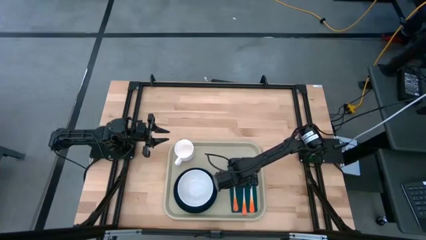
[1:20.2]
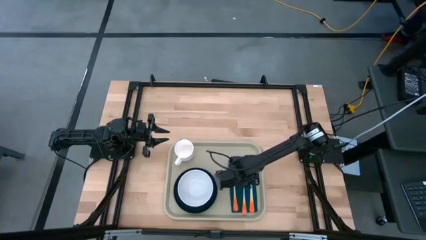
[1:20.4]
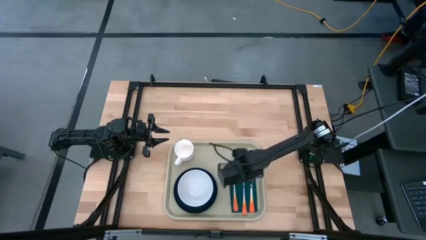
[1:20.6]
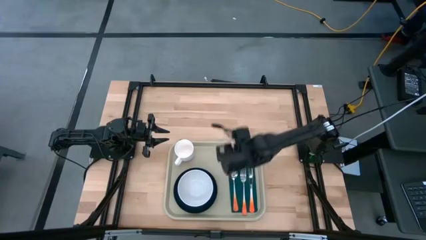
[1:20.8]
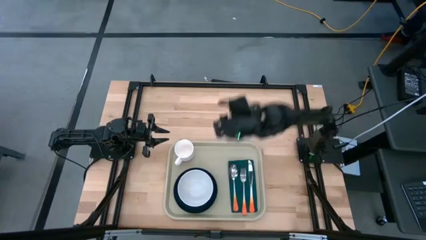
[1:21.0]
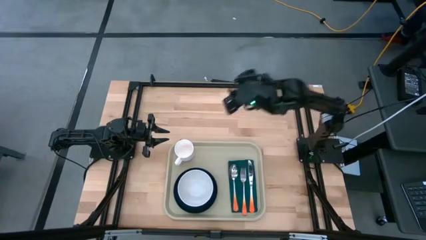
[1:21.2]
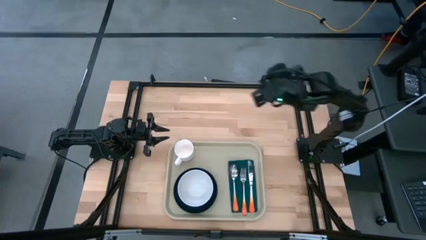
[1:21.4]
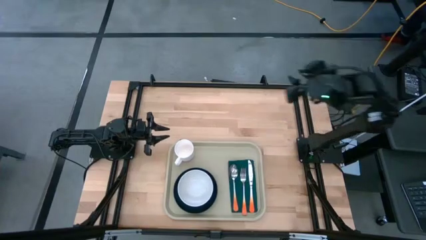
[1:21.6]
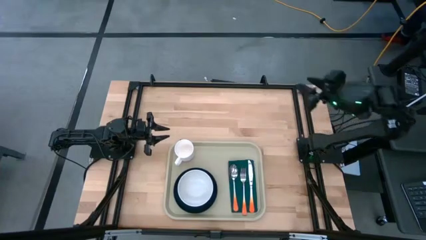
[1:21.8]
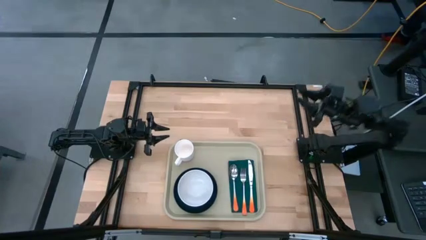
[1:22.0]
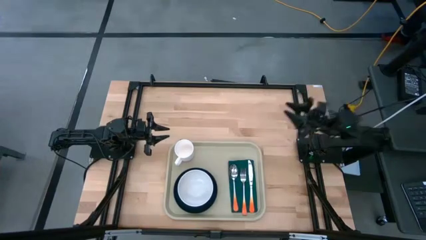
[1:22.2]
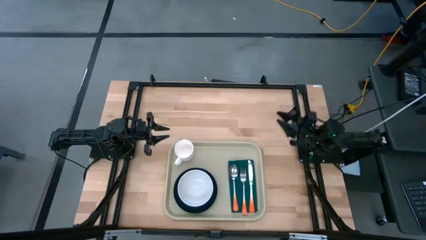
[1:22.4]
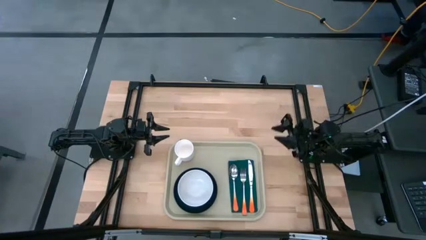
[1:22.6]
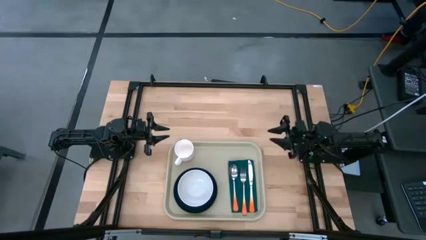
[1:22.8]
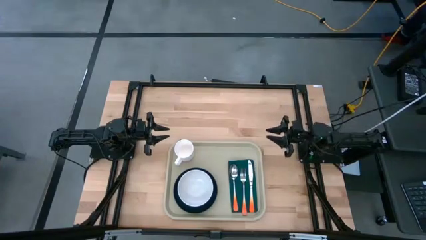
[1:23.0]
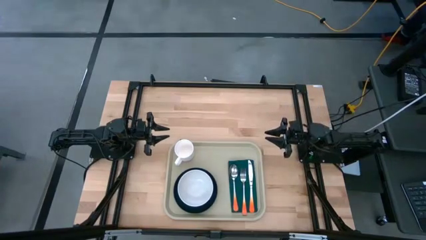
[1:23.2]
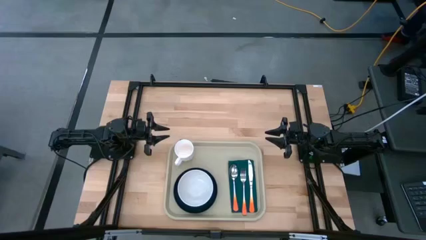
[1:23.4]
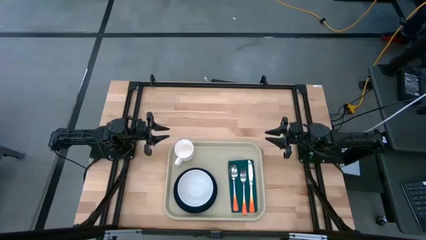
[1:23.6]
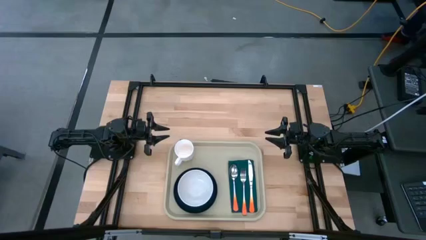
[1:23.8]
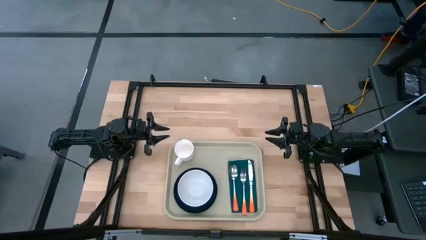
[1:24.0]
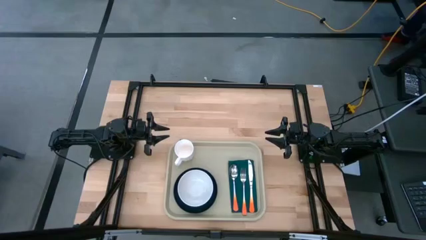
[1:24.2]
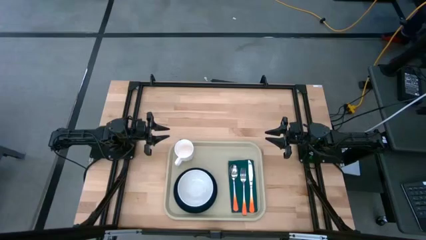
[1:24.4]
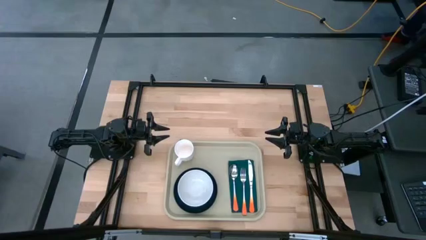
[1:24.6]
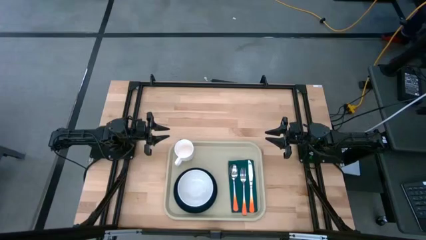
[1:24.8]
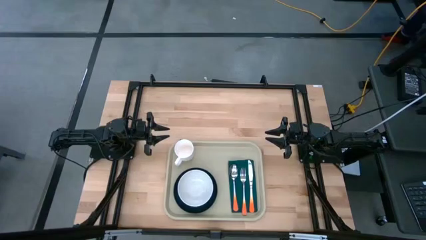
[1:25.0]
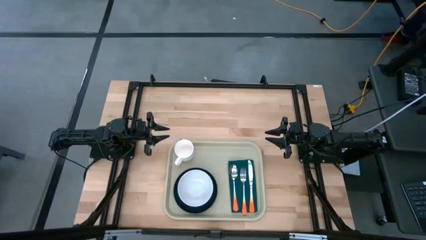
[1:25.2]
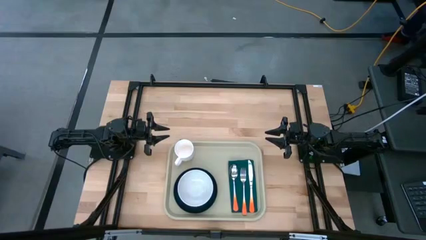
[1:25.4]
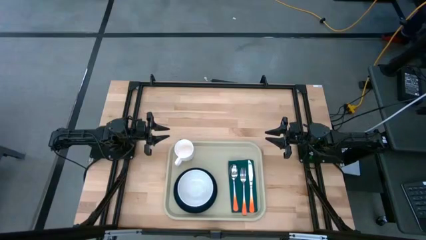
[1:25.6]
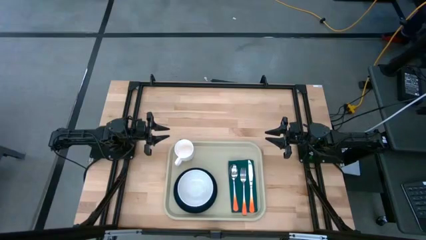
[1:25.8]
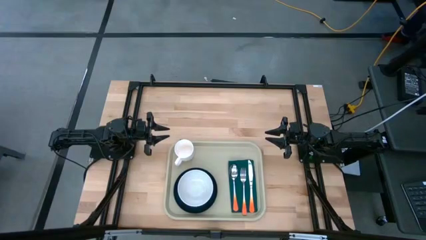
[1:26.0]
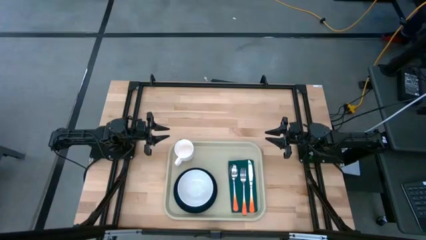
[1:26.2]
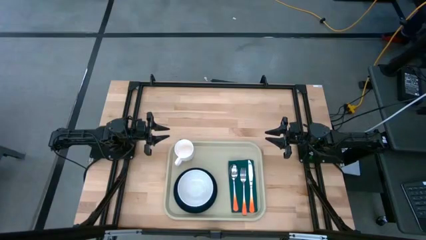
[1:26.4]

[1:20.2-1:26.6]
Task: Set up tray
Return to Home Position

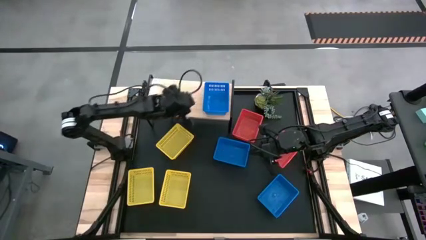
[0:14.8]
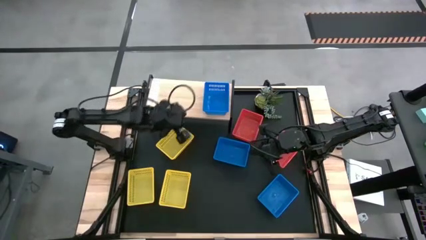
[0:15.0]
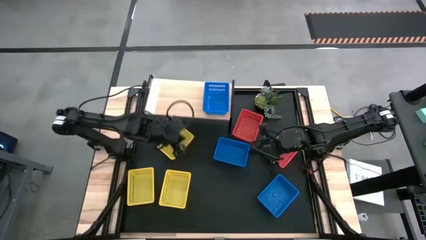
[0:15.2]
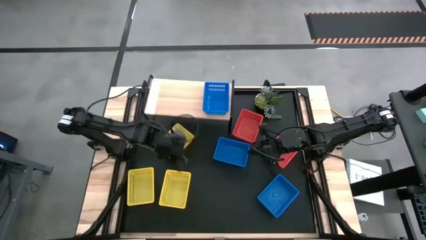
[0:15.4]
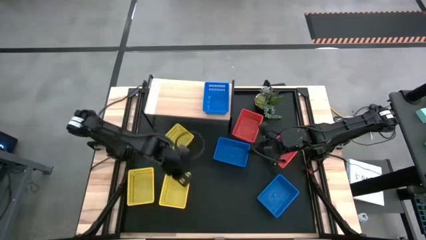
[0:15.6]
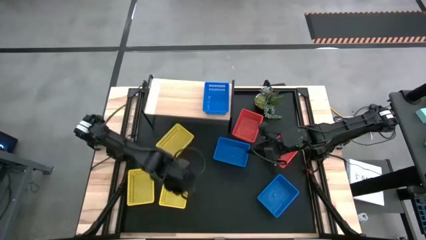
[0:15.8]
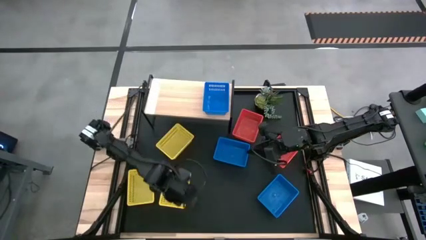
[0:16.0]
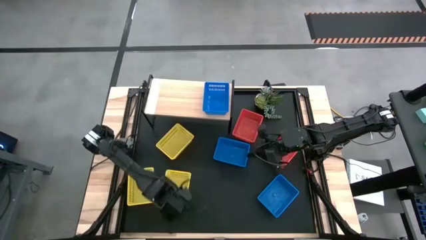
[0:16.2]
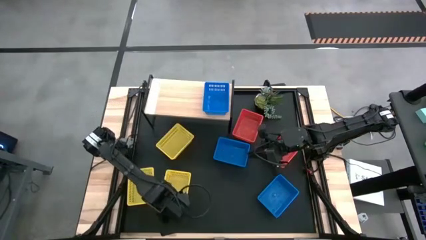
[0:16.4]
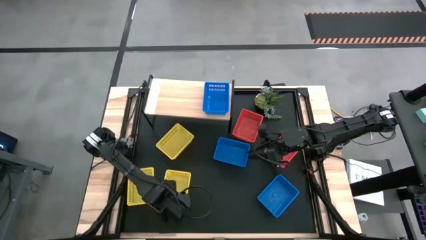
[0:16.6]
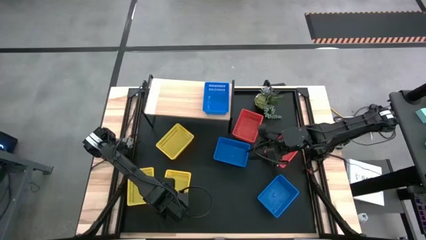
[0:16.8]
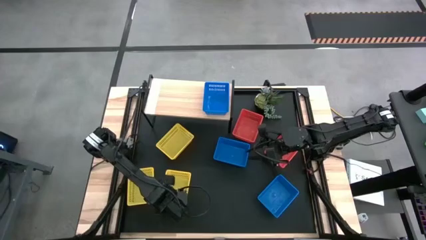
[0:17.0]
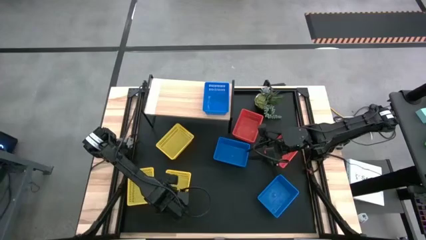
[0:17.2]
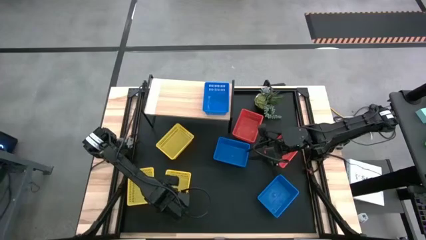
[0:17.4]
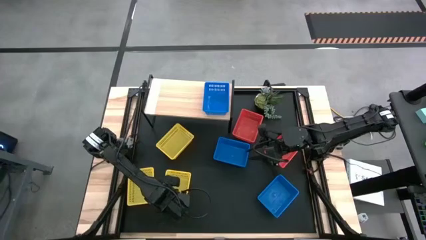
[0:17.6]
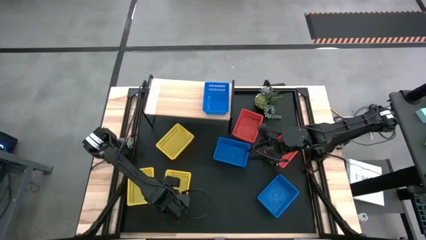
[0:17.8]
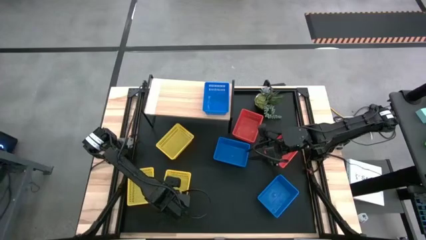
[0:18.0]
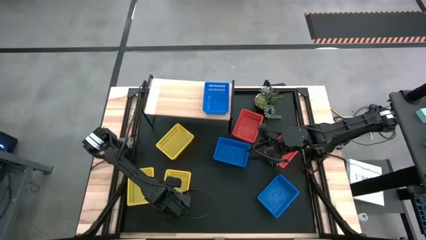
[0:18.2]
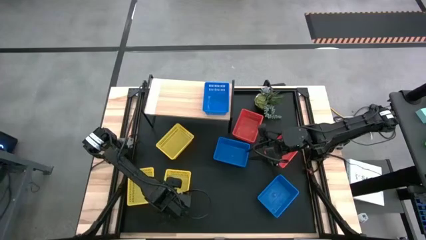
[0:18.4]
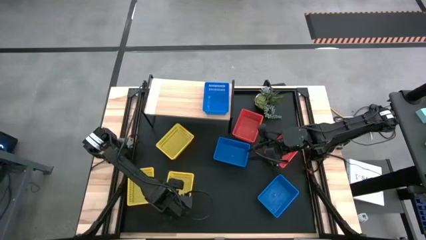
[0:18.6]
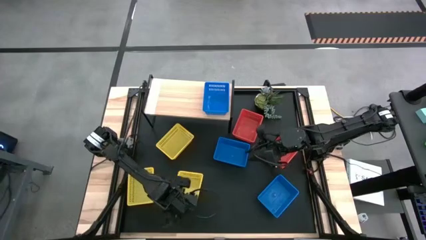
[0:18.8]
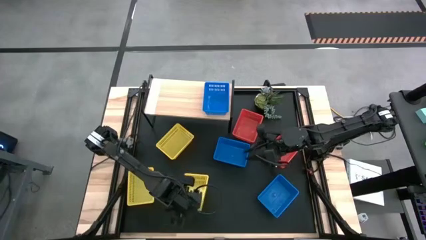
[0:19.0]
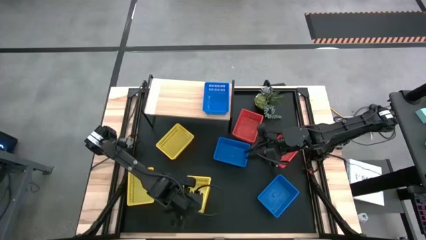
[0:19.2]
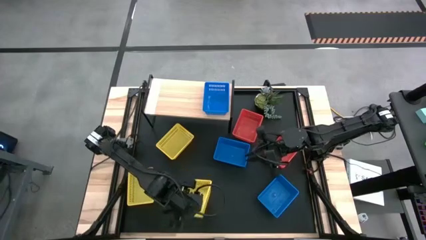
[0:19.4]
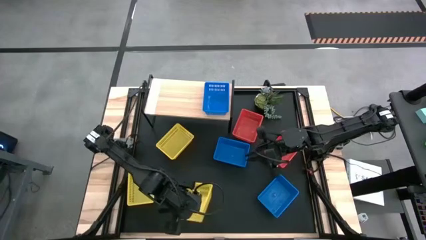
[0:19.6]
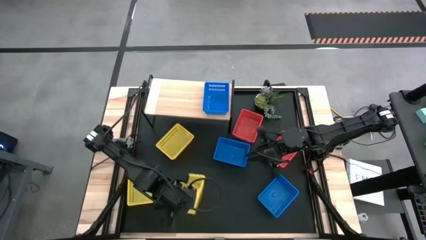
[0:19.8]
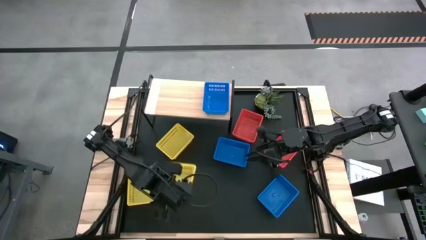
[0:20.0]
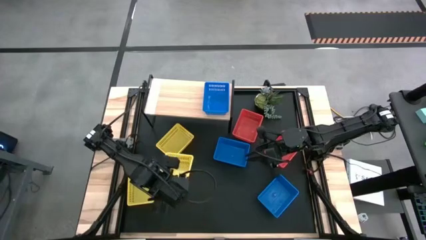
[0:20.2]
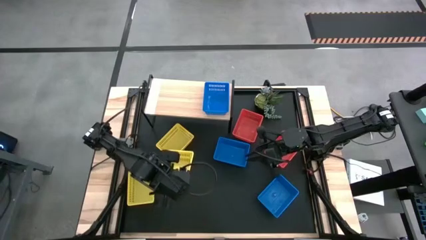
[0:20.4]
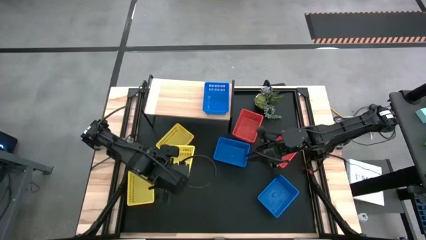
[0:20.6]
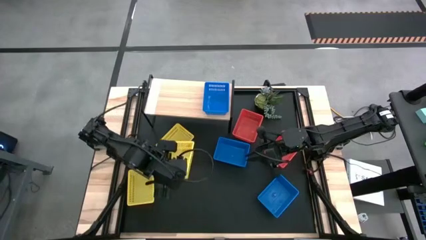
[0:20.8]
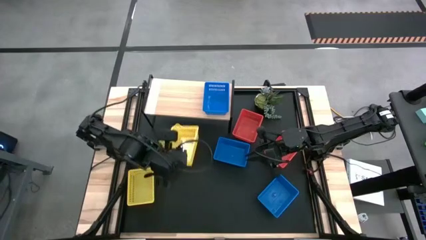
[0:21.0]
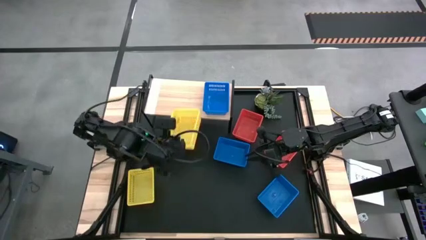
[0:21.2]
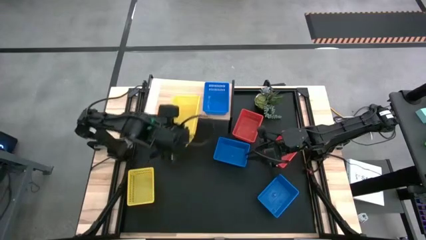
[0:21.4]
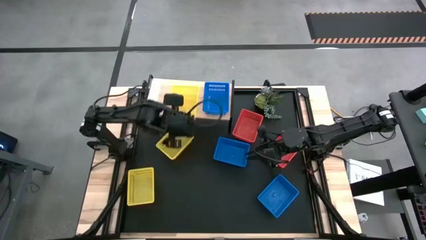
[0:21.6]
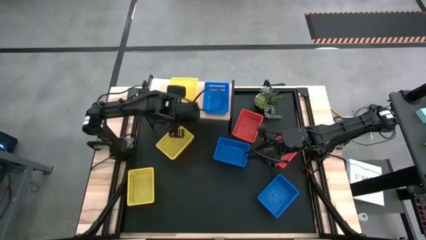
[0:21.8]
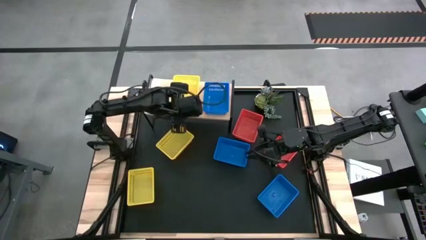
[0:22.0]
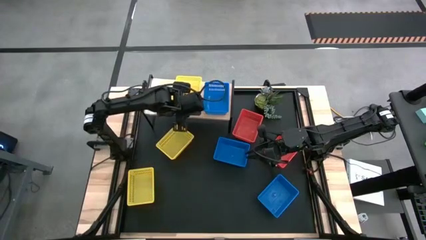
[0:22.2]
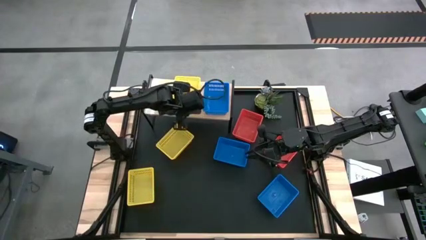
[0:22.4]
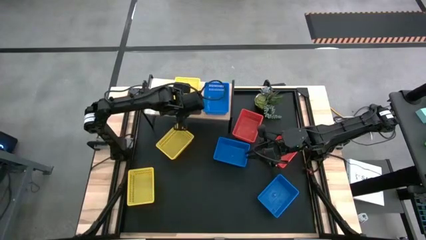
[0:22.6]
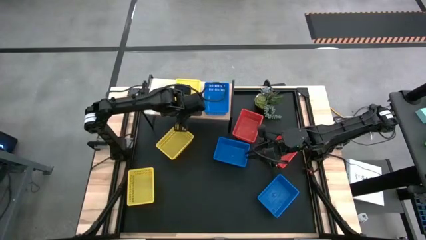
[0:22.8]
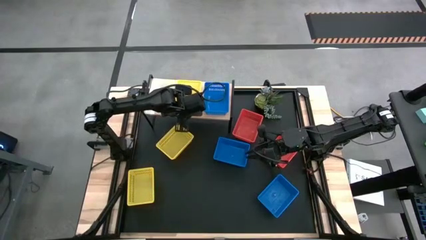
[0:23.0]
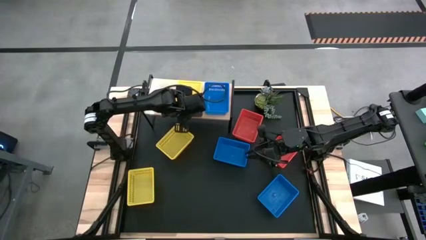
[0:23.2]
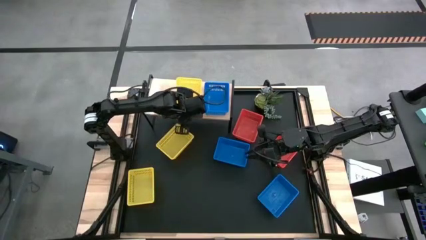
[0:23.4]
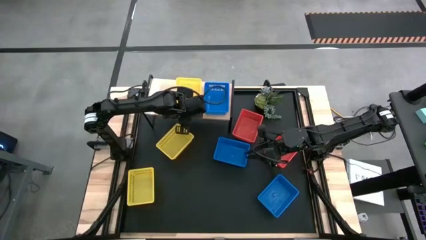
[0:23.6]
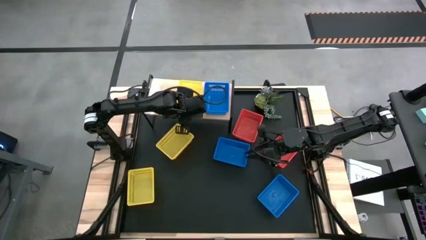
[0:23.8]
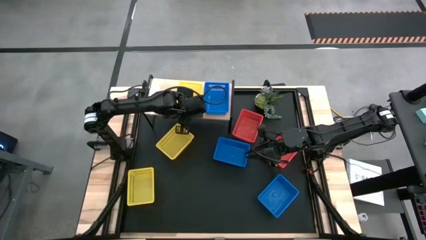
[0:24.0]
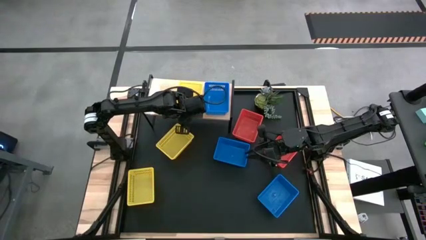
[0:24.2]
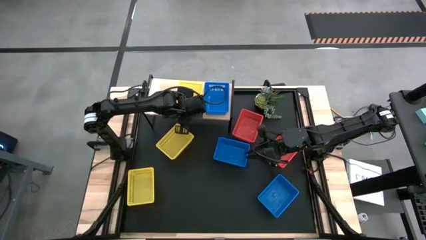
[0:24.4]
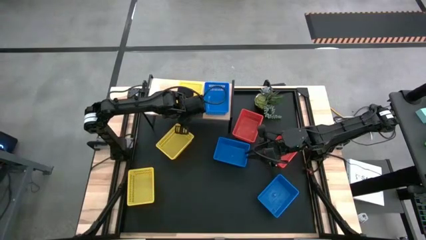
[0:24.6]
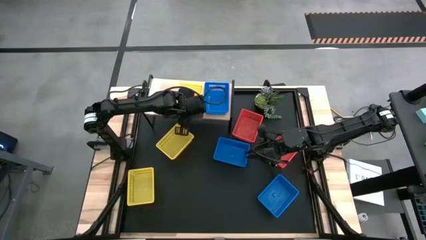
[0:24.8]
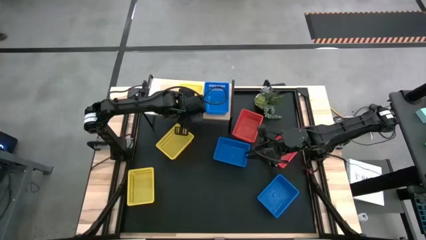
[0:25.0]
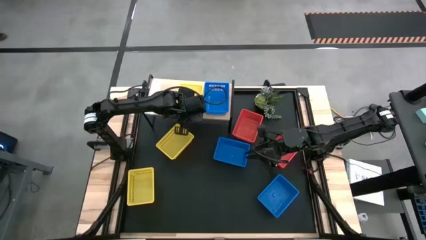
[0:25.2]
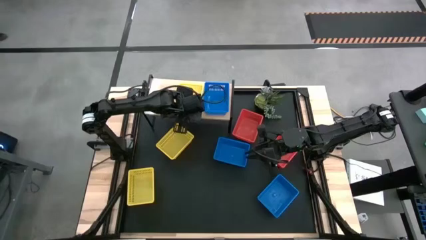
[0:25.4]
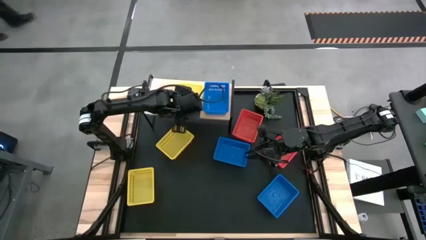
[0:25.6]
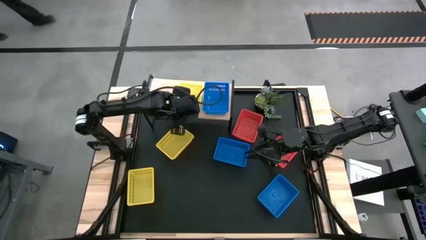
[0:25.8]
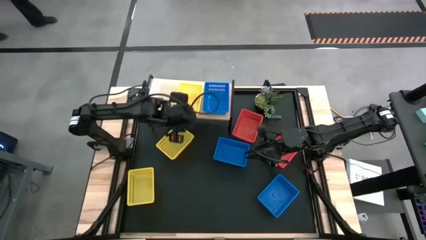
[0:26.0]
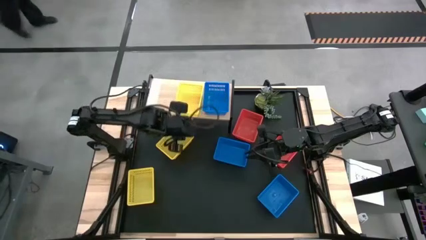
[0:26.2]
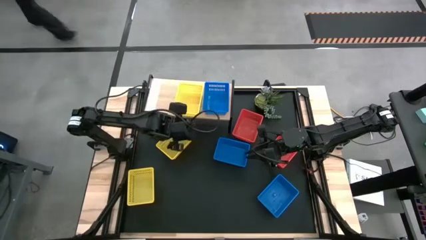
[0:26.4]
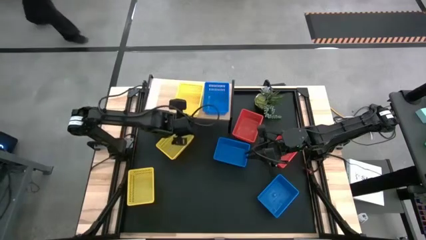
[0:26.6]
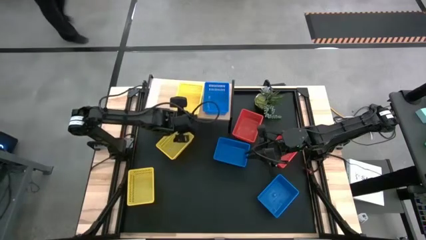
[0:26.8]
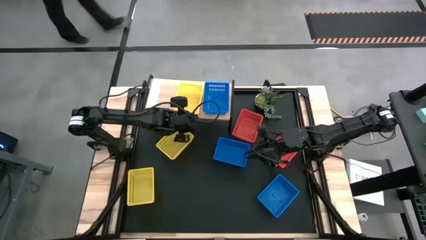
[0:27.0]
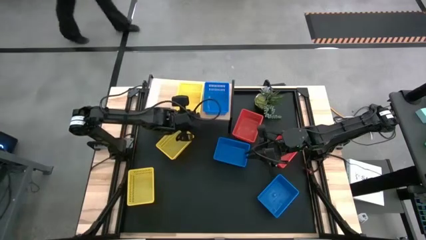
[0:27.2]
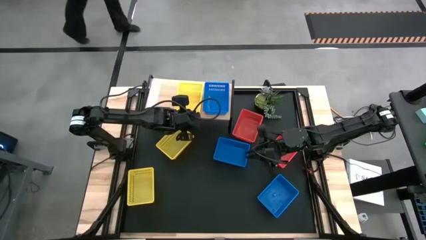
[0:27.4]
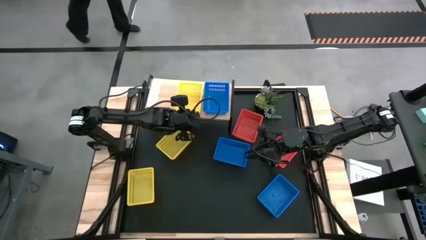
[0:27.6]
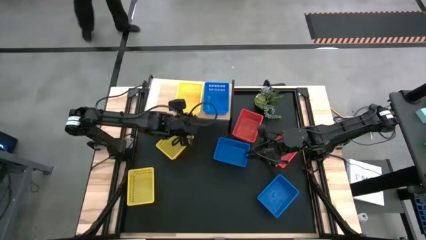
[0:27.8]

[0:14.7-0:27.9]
Task: Stack baskets on shelf by color
Put the bottom right yellow bin on the shelf
